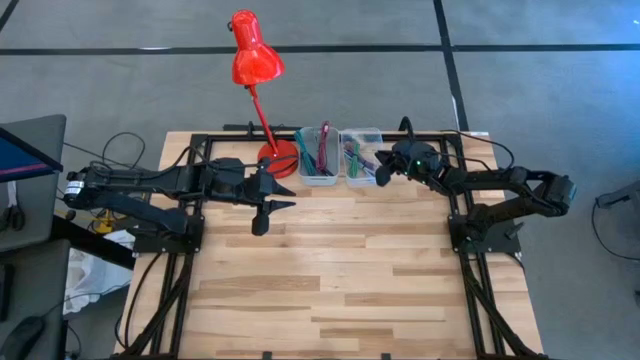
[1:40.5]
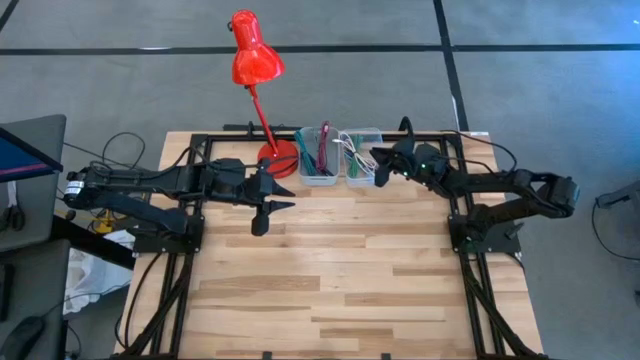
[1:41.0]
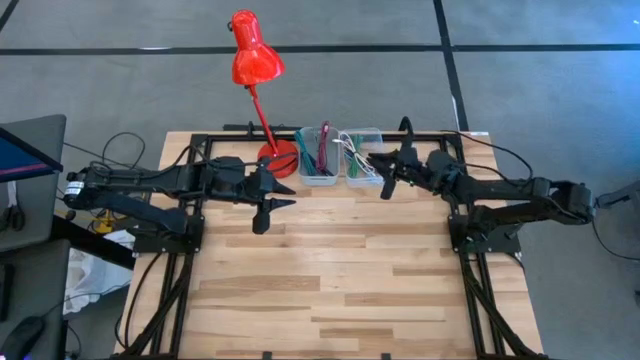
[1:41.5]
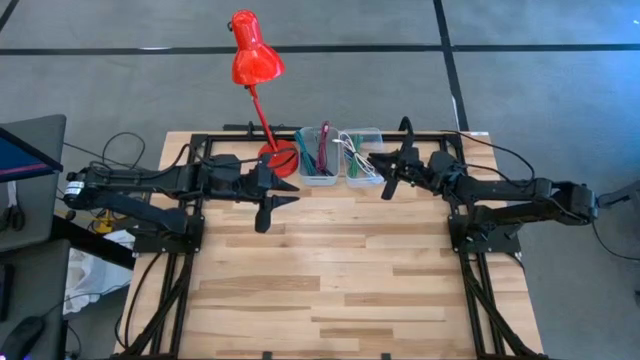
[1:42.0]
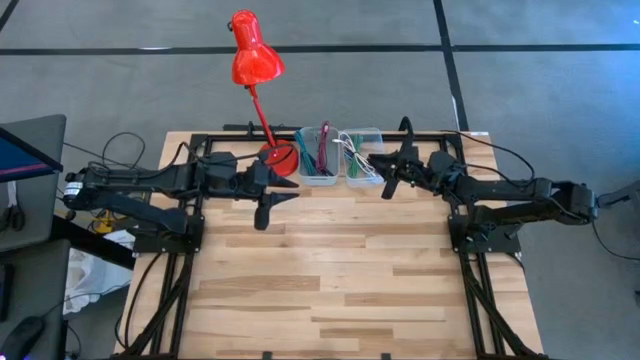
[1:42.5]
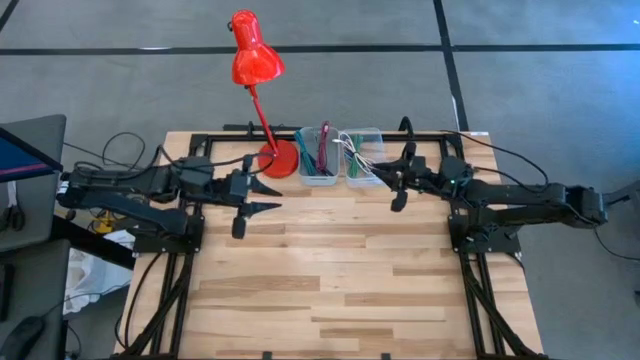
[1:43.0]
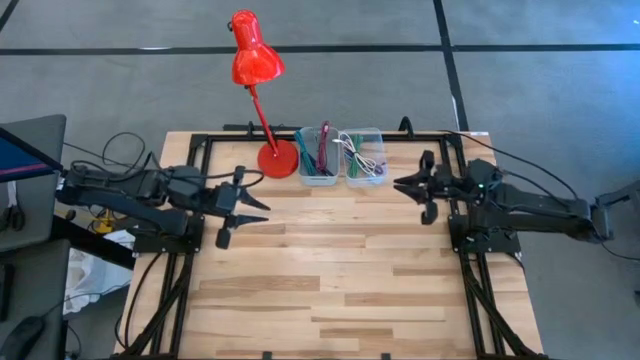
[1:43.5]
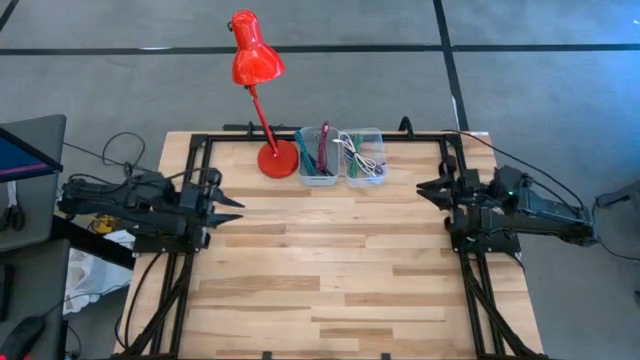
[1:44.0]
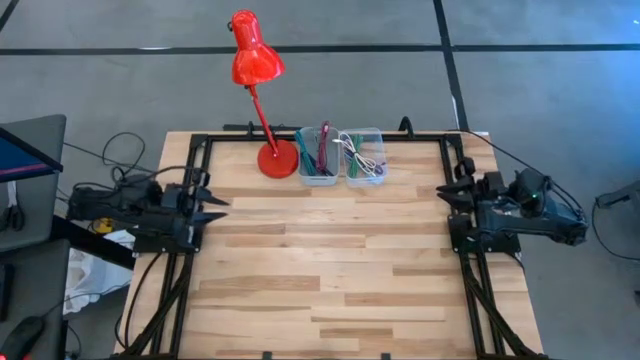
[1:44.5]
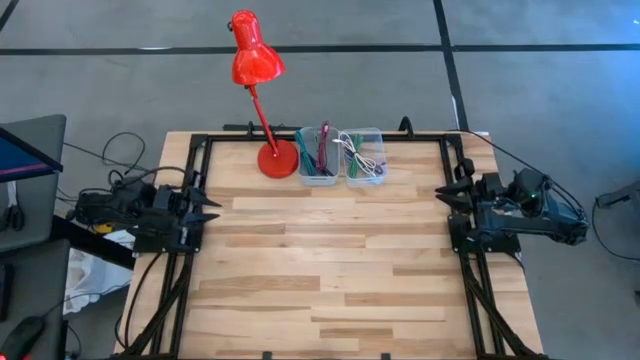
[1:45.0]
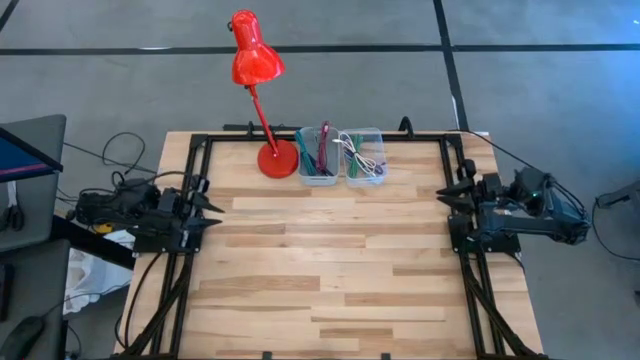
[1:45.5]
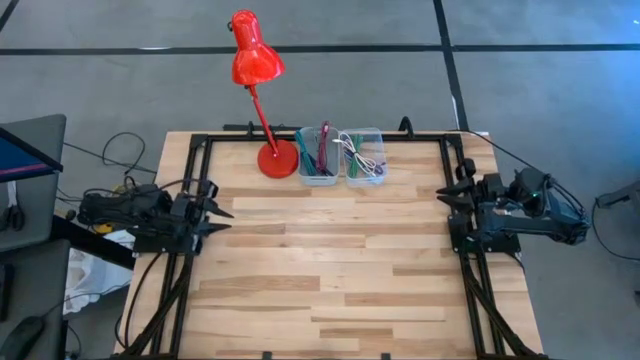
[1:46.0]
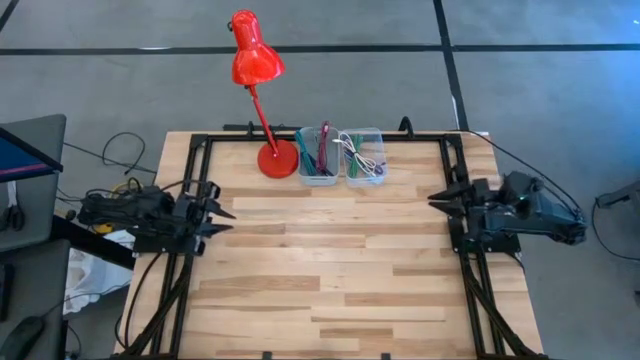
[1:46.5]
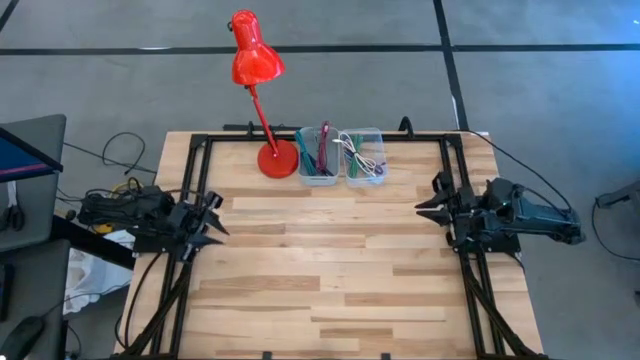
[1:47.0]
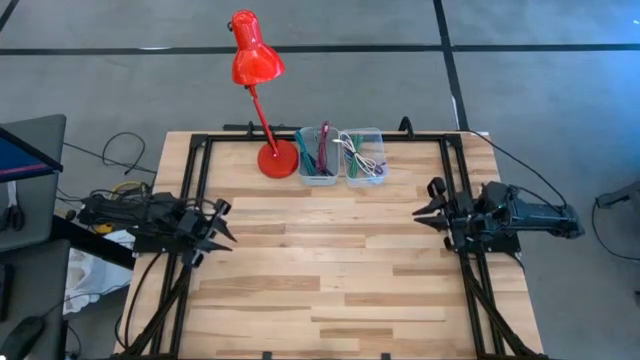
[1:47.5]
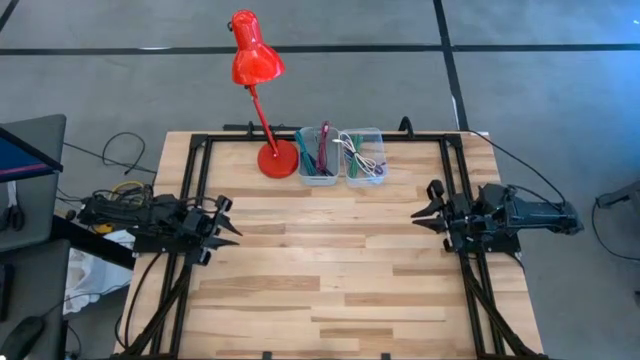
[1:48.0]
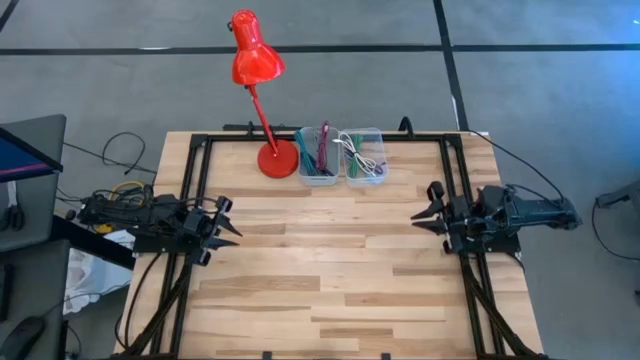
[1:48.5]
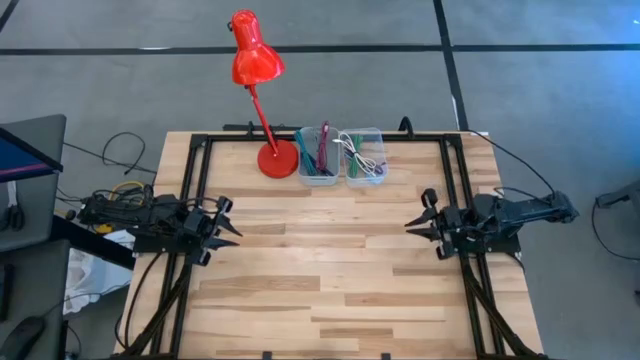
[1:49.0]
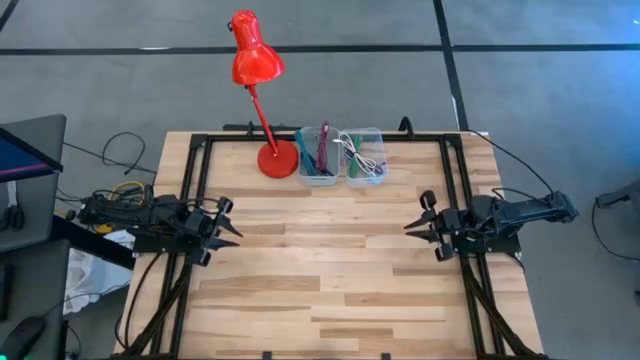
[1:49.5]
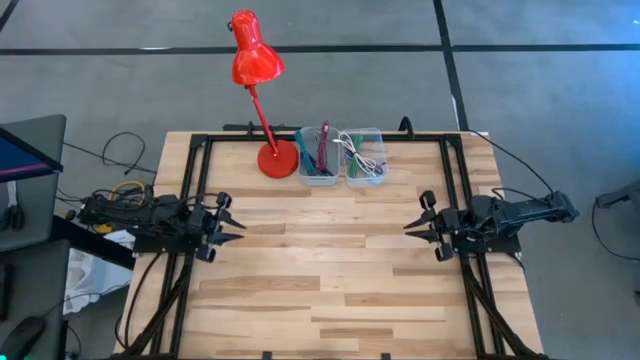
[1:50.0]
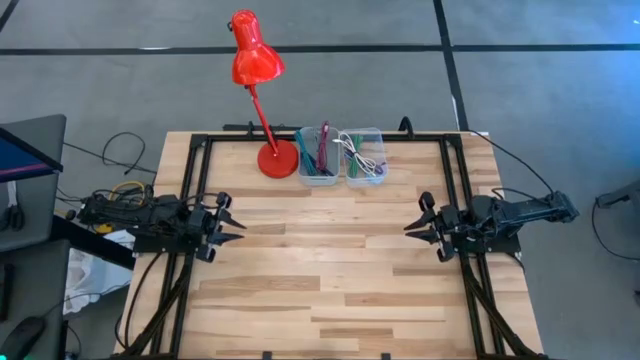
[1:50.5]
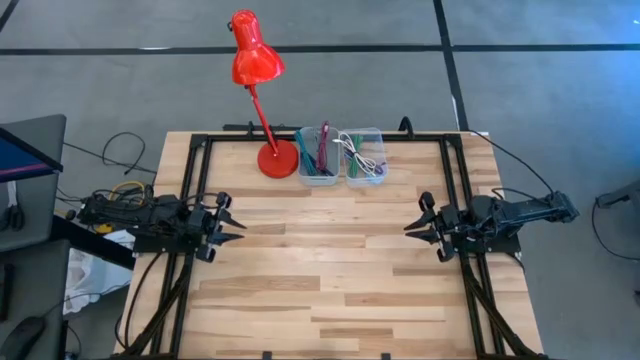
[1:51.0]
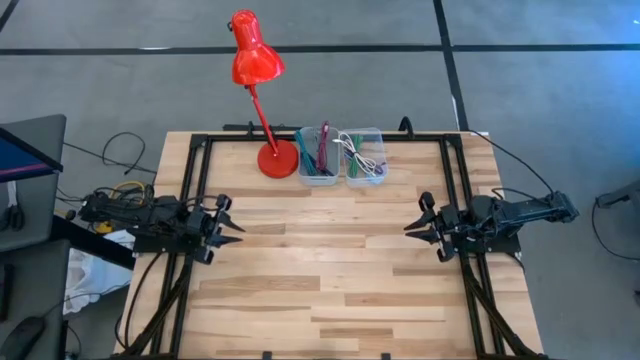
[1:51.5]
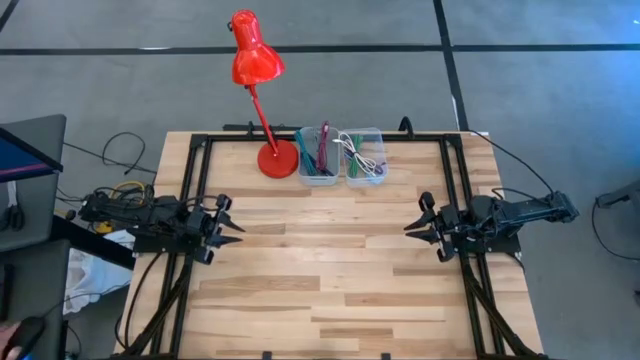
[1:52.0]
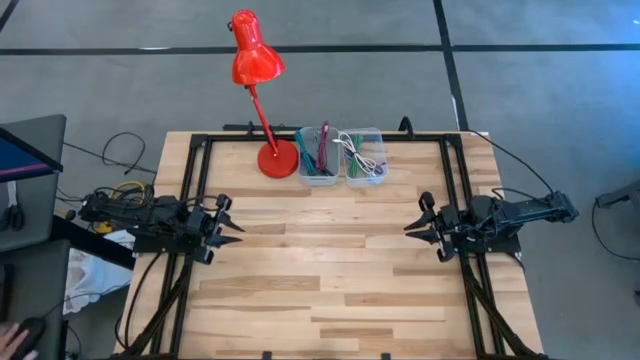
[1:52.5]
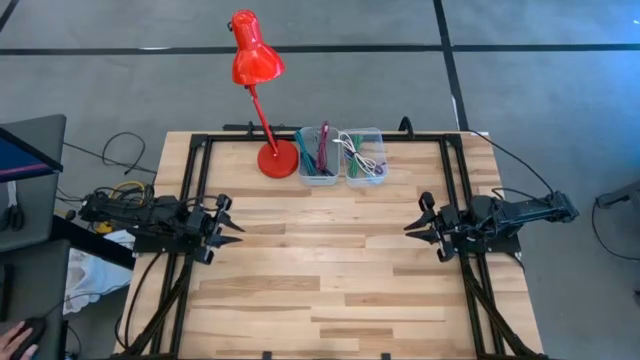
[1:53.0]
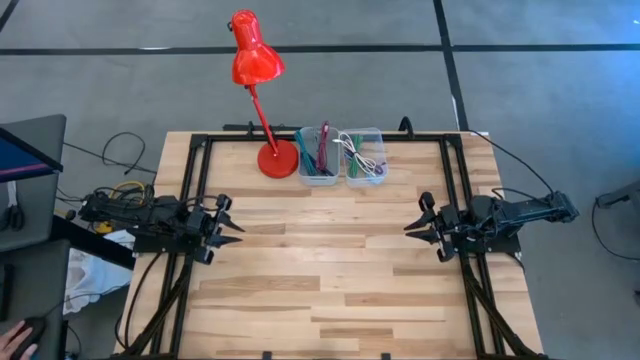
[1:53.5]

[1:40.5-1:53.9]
Task: Pick & Place USB Port
Return to Home Position

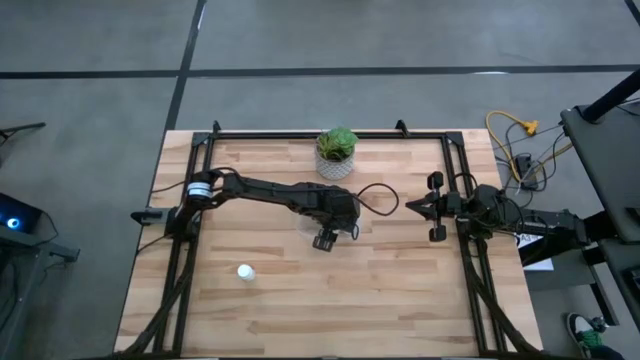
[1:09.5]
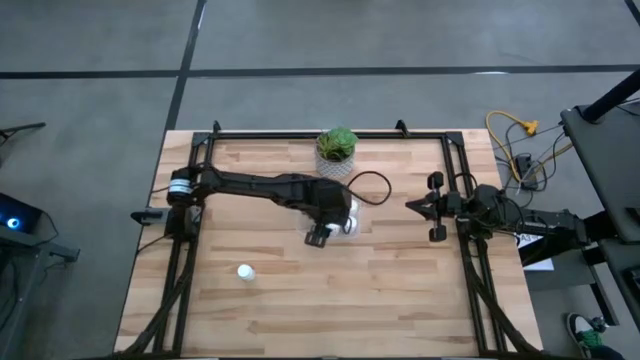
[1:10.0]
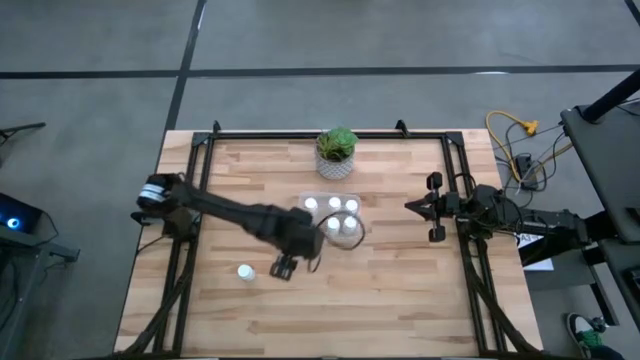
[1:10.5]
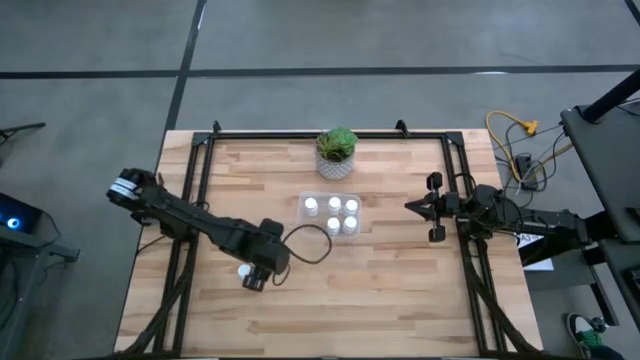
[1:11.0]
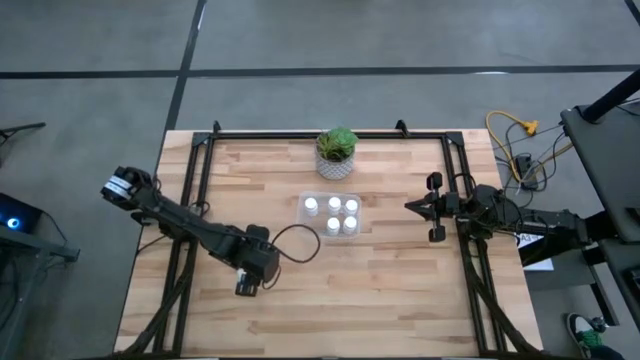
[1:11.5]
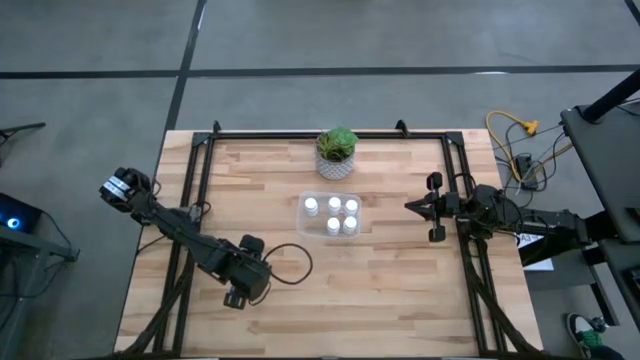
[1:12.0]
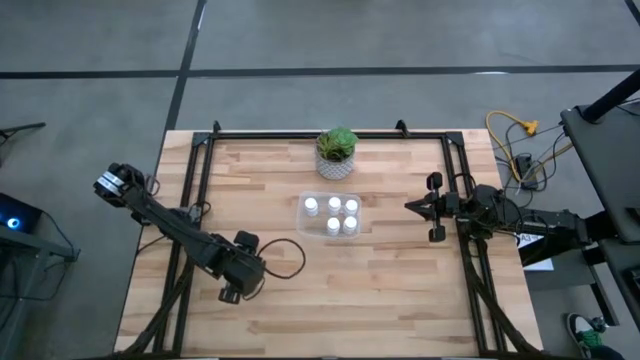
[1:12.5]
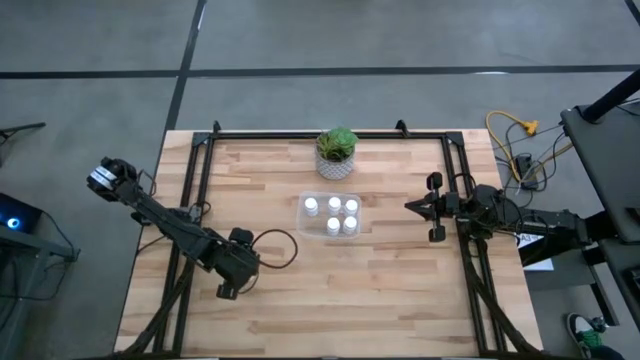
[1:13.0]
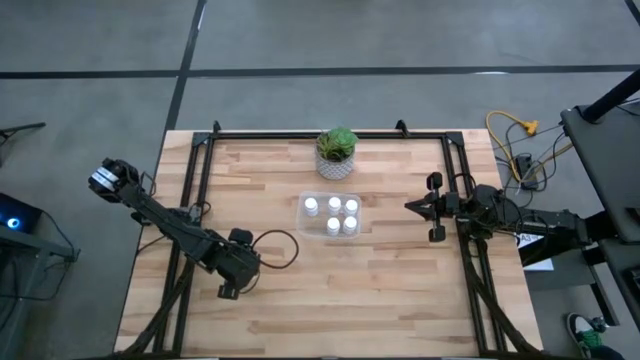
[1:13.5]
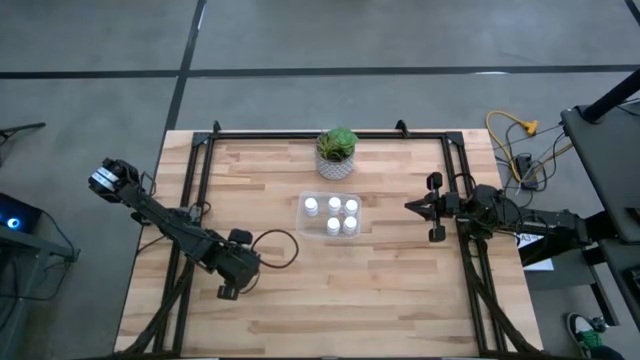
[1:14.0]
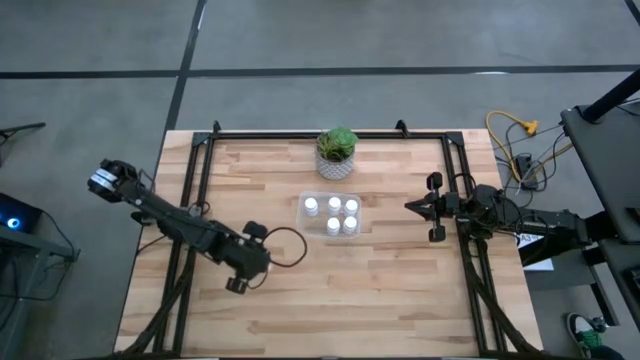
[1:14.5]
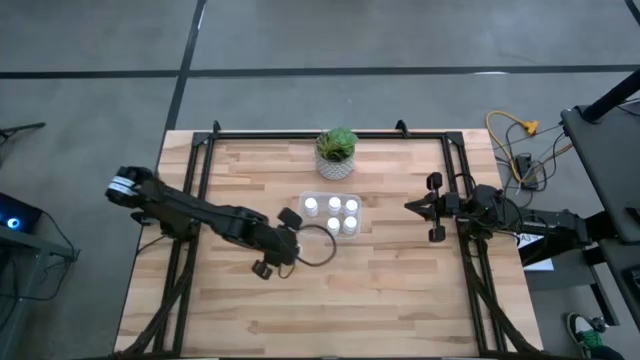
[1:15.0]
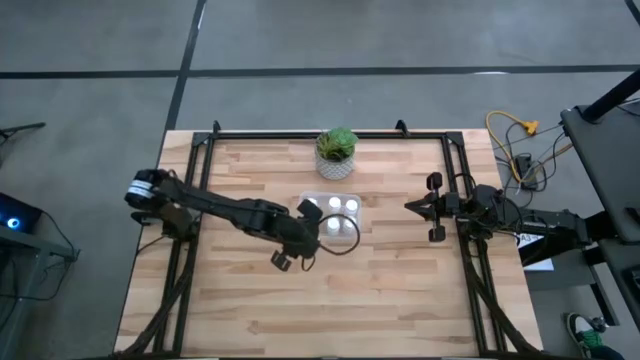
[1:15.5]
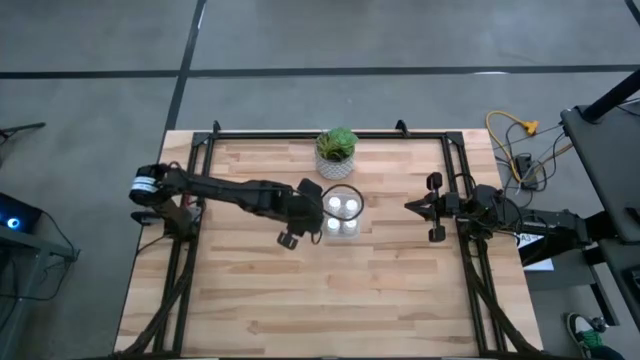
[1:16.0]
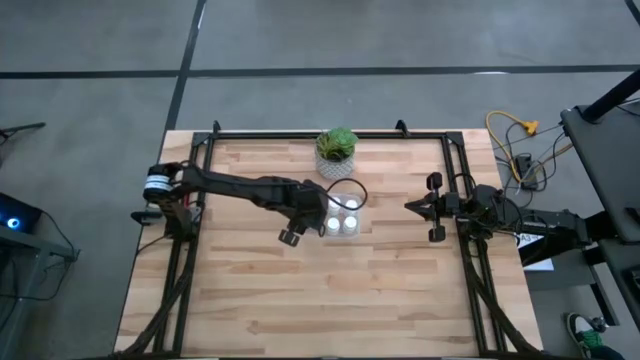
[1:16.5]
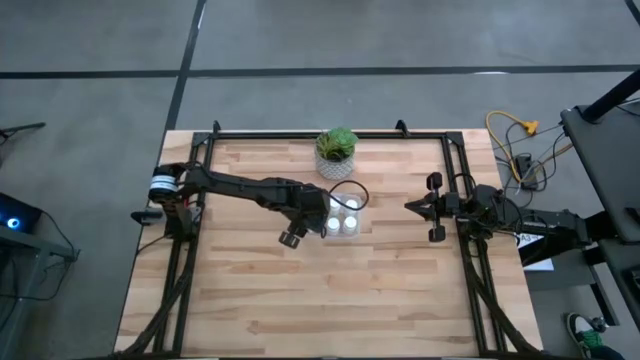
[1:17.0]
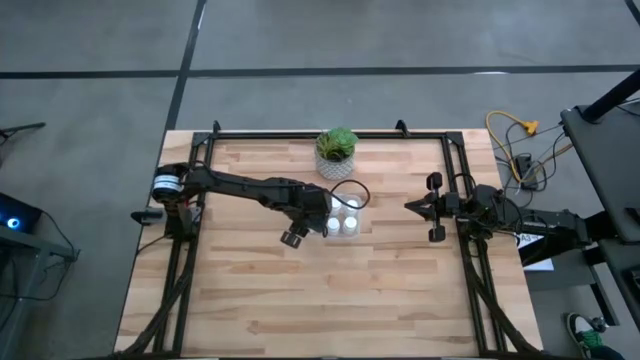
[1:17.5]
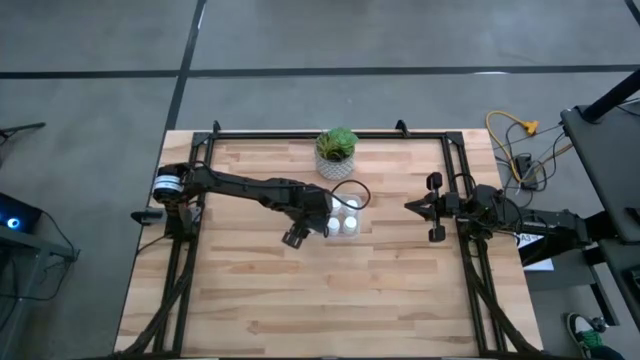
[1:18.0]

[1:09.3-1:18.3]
Task: Pick and place pill bottles into a basket
Put the white medicine bottle into the transparent bin
